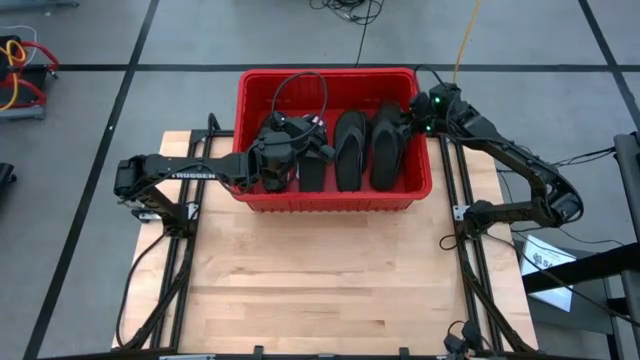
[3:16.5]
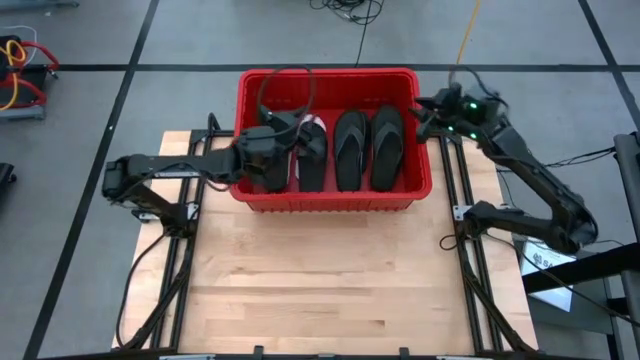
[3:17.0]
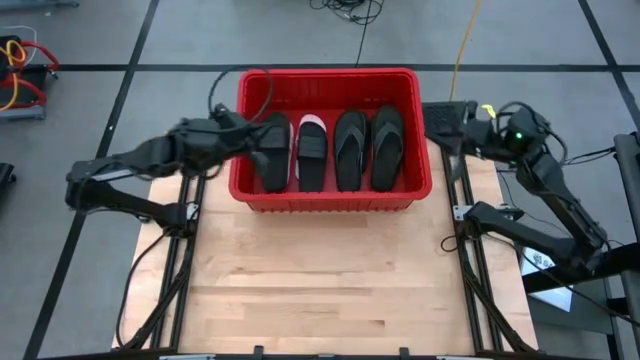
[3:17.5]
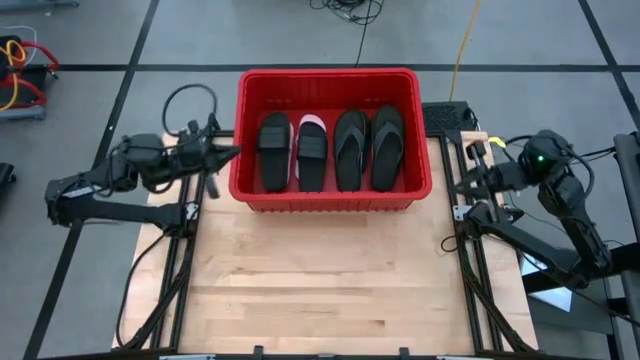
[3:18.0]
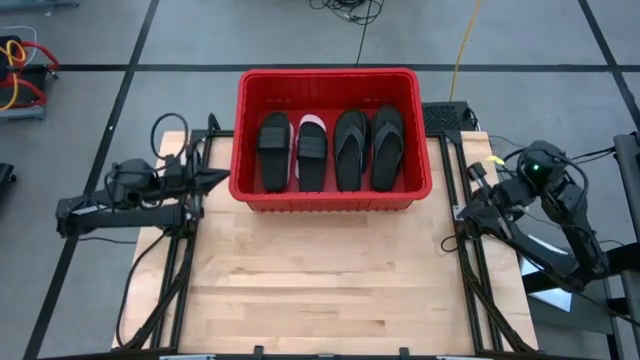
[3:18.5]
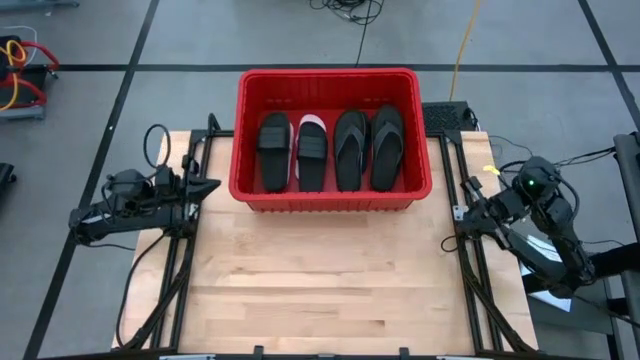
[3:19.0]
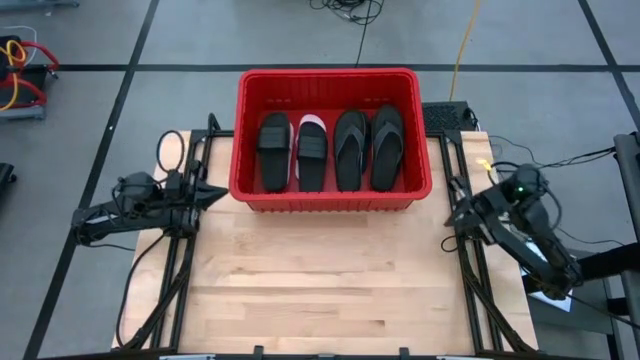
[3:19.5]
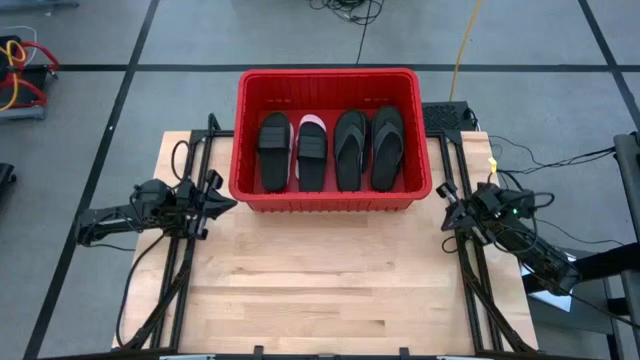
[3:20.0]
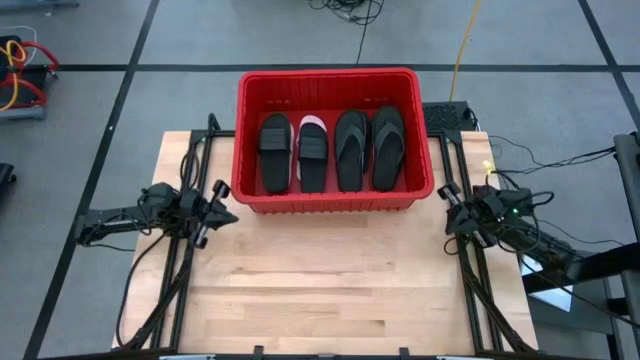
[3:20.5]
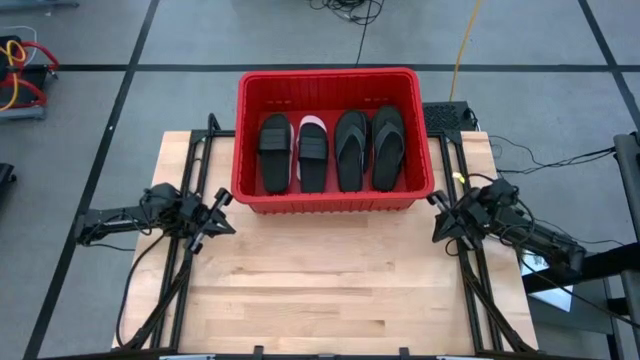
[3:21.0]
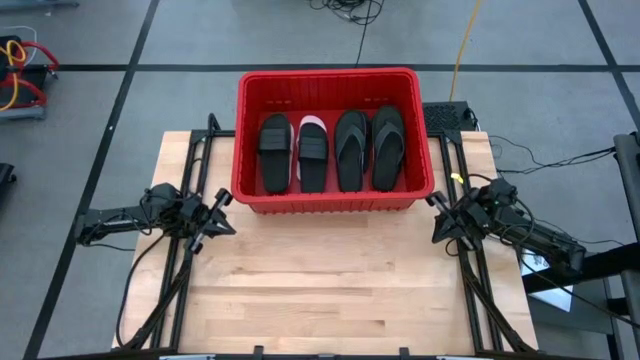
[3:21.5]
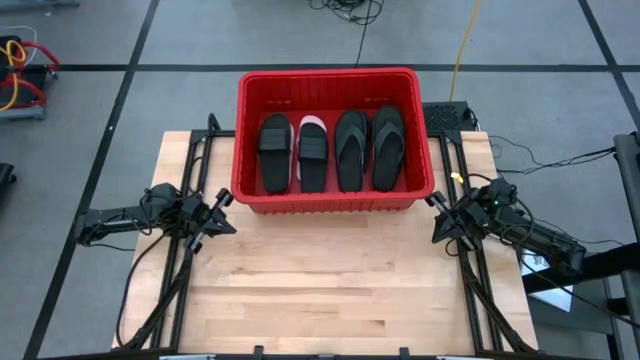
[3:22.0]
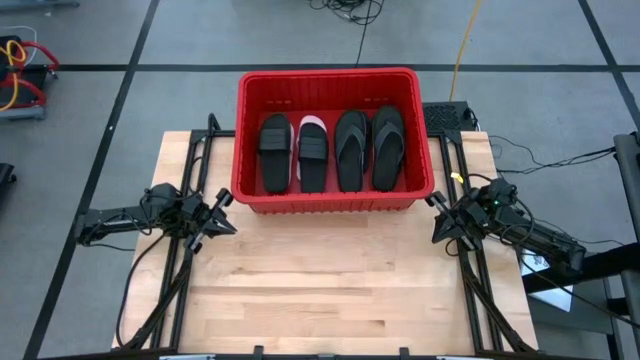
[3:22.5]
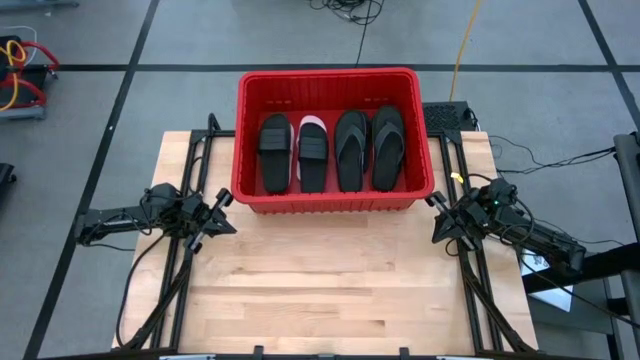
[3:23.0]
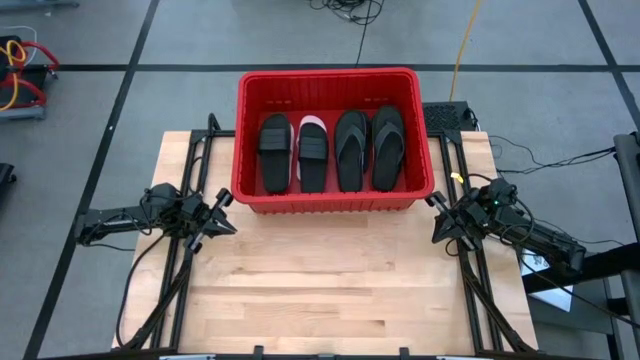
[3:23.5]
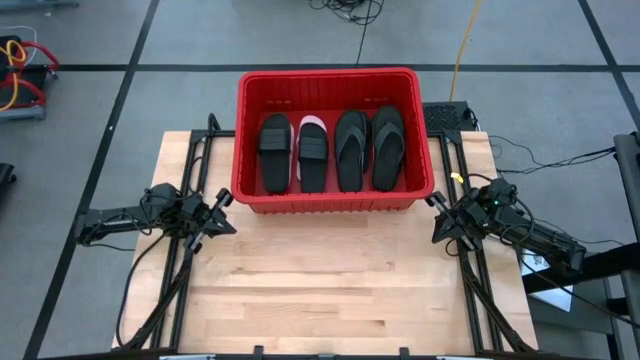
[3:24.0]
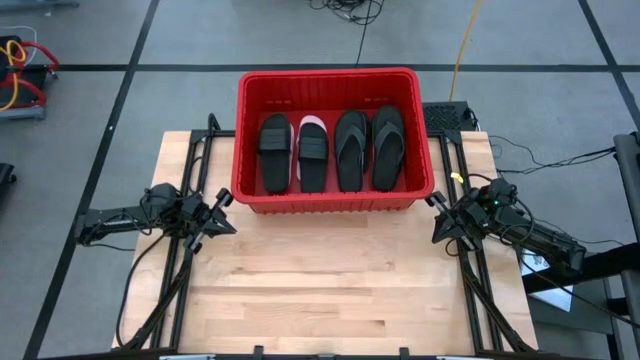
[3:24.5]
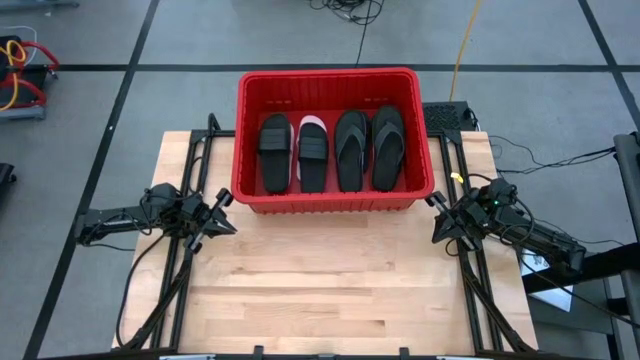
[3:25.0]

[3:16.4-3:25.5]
Task: Pick and place slides into bin
Return to Home Position

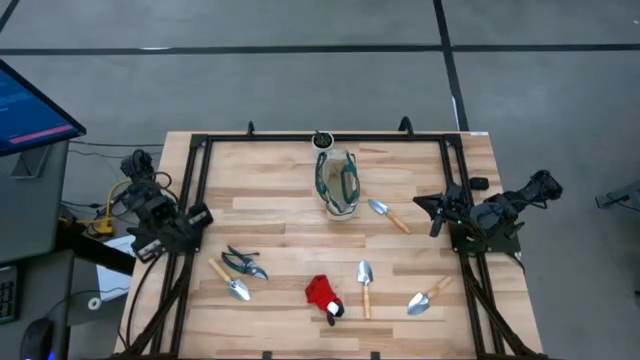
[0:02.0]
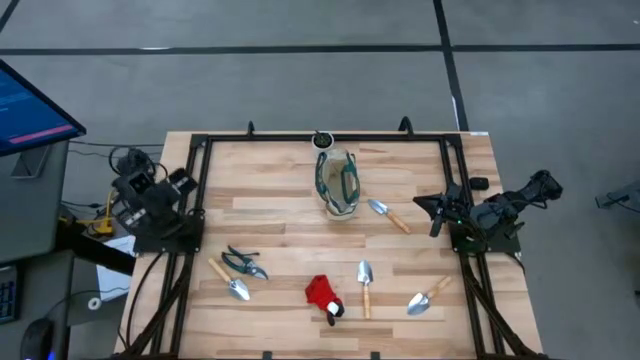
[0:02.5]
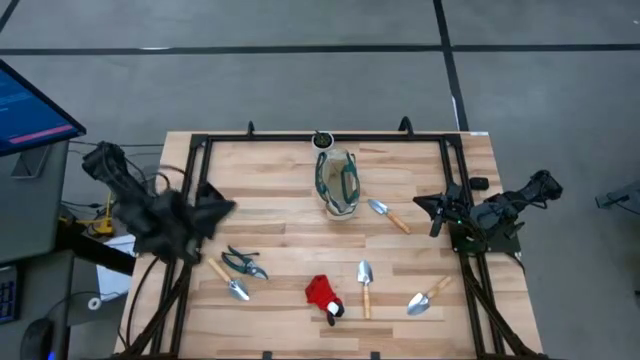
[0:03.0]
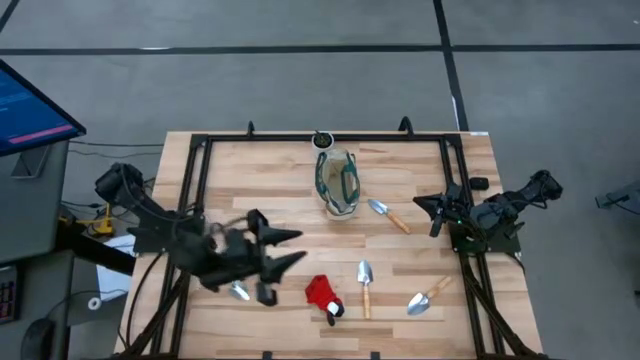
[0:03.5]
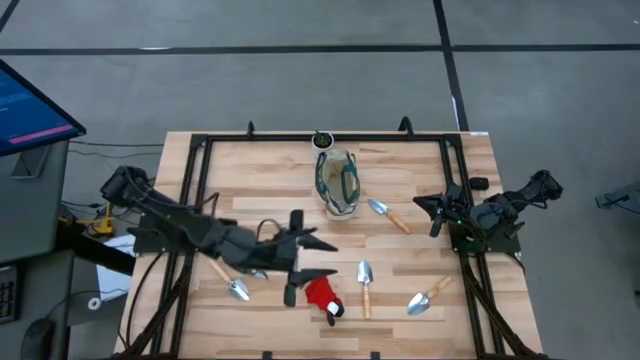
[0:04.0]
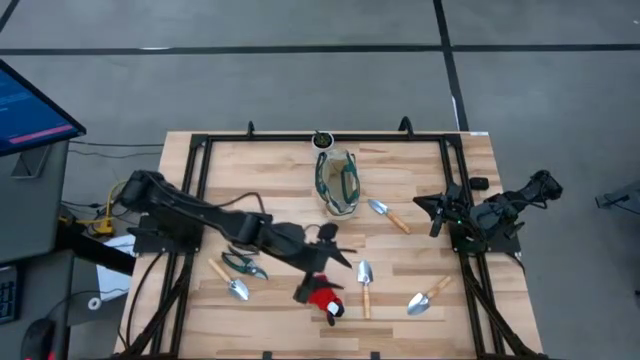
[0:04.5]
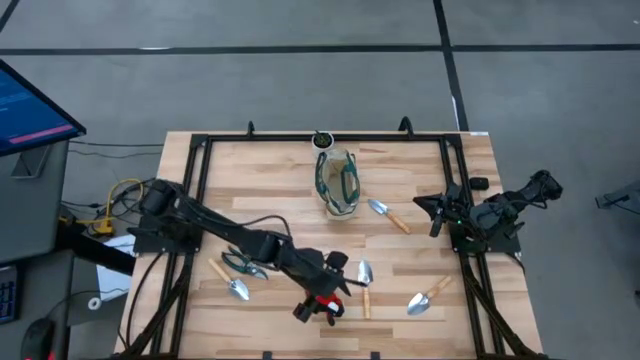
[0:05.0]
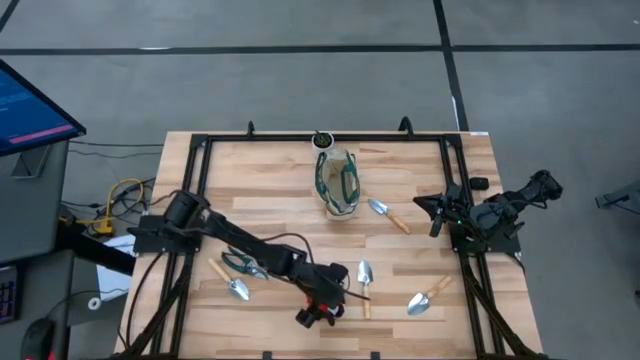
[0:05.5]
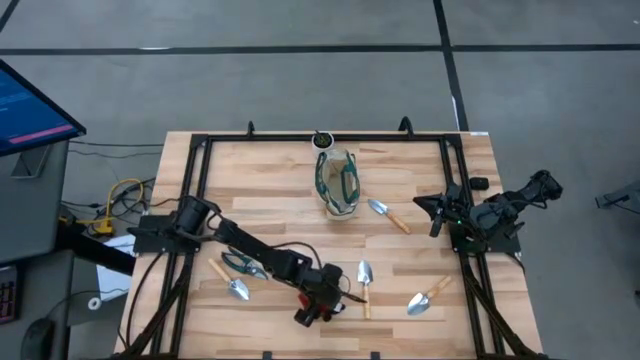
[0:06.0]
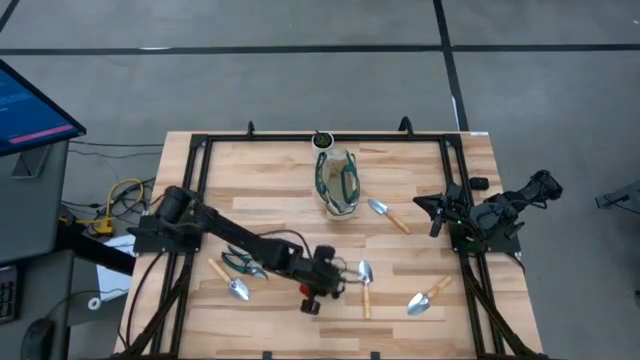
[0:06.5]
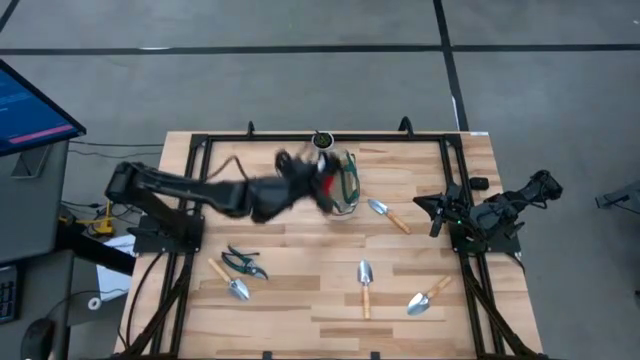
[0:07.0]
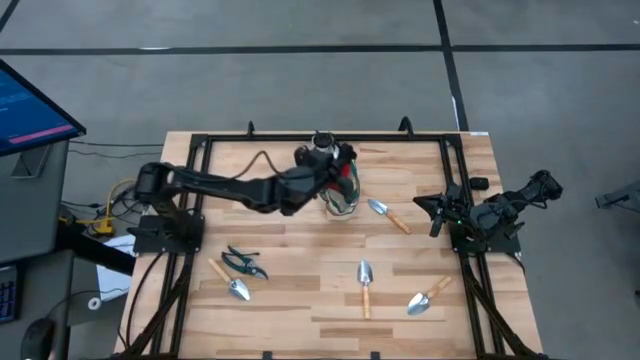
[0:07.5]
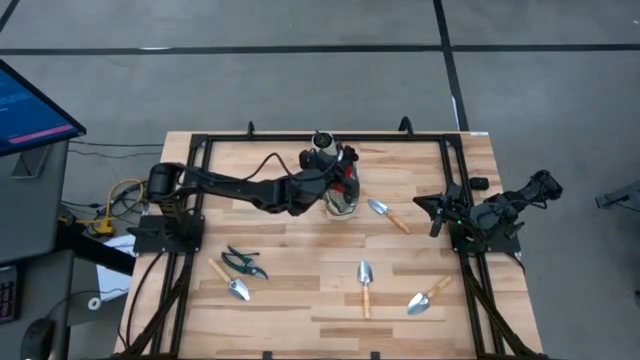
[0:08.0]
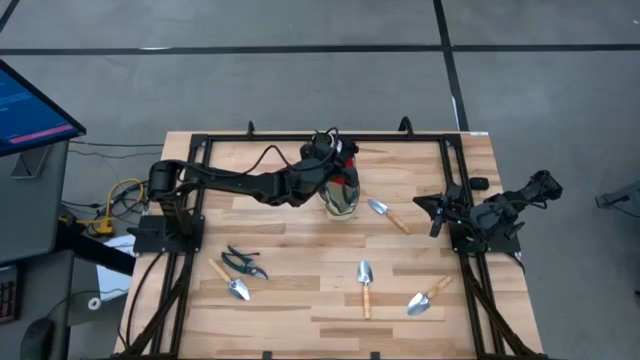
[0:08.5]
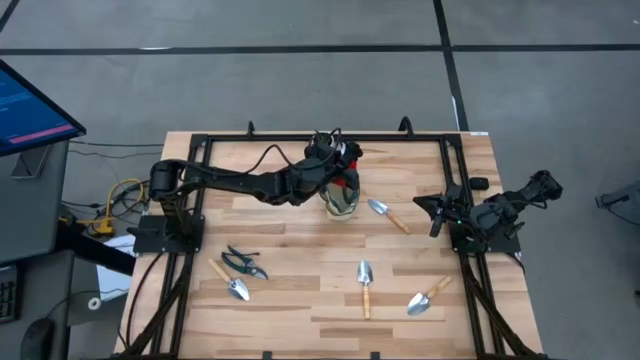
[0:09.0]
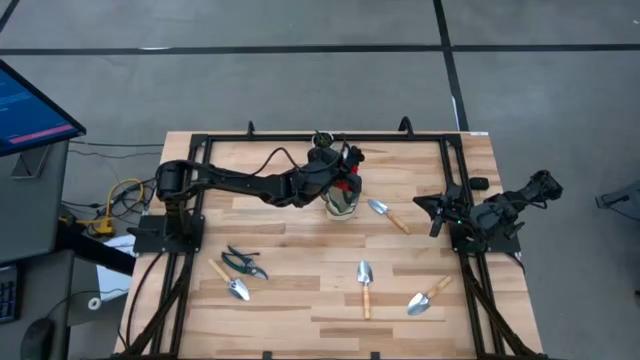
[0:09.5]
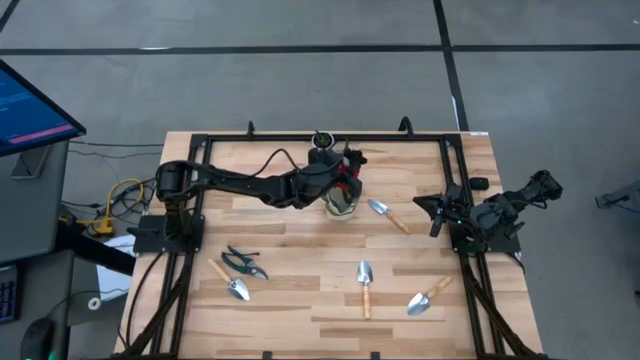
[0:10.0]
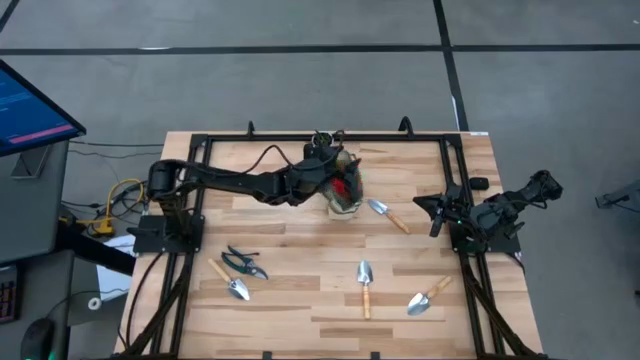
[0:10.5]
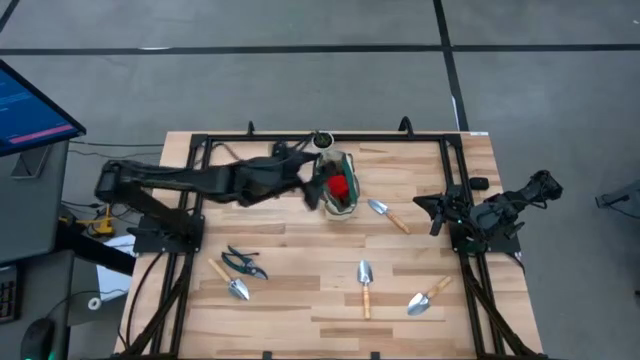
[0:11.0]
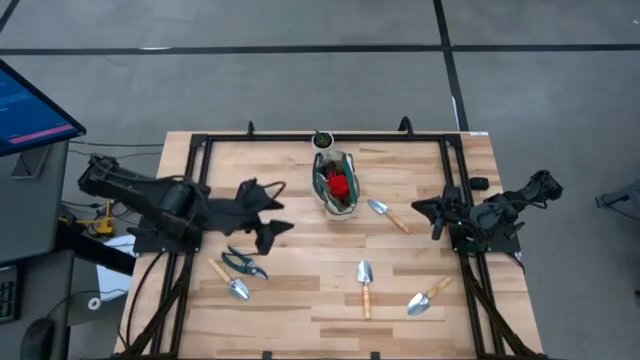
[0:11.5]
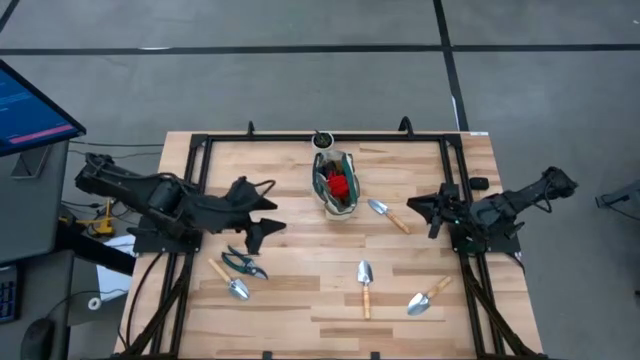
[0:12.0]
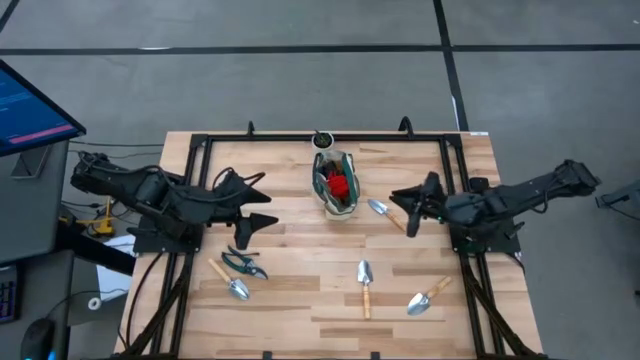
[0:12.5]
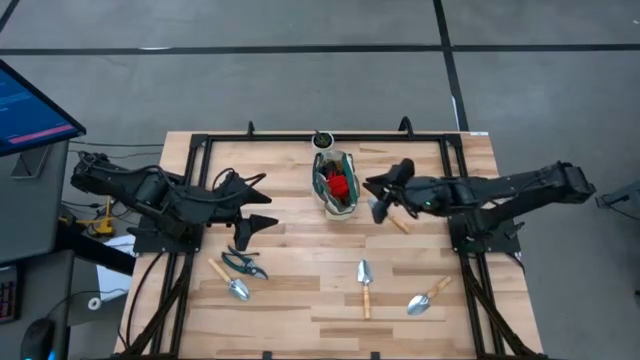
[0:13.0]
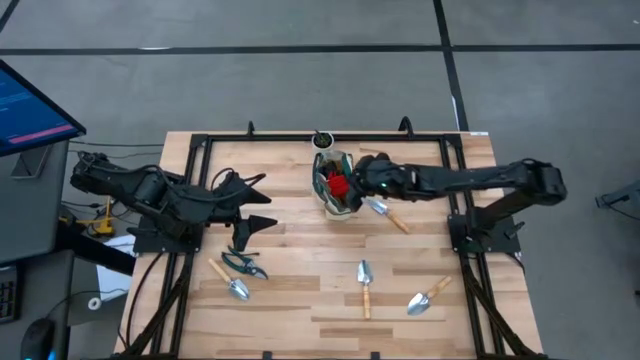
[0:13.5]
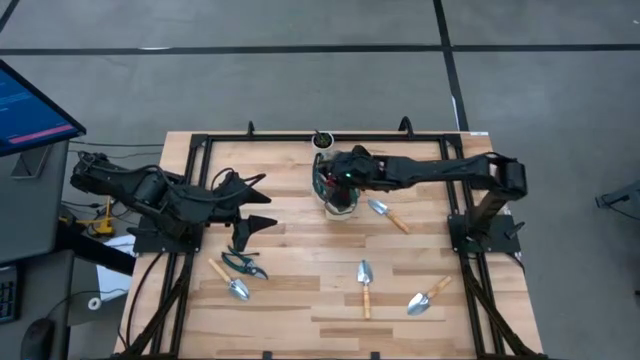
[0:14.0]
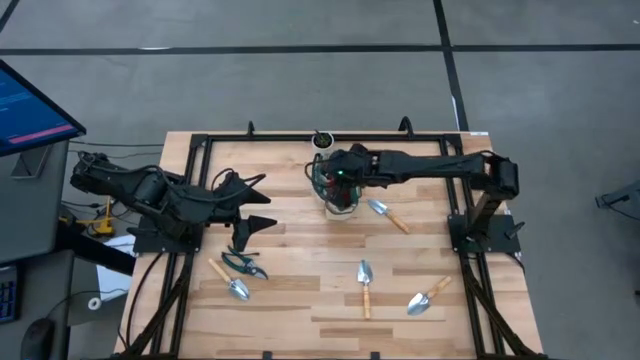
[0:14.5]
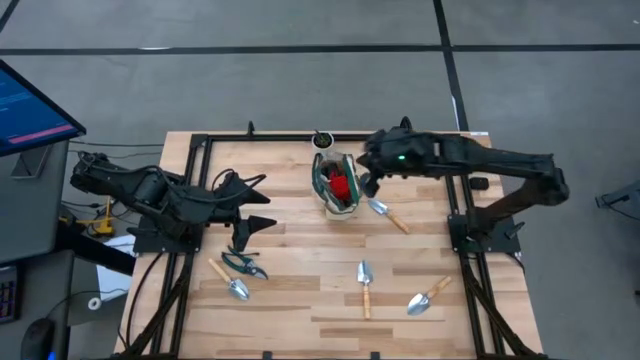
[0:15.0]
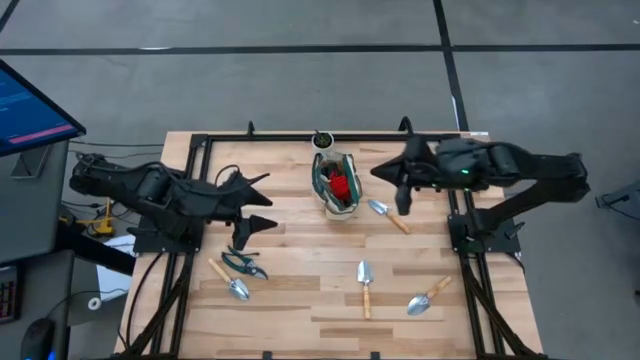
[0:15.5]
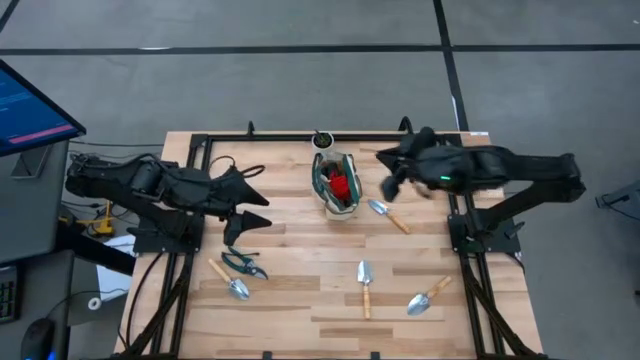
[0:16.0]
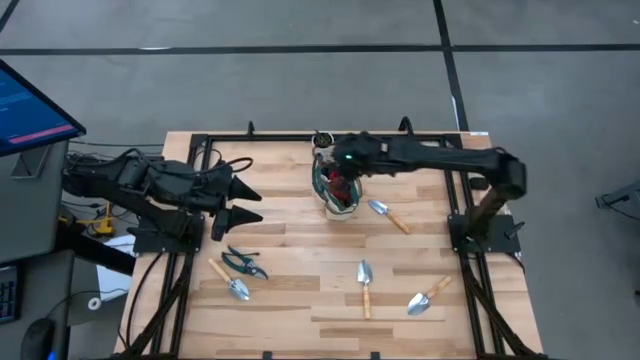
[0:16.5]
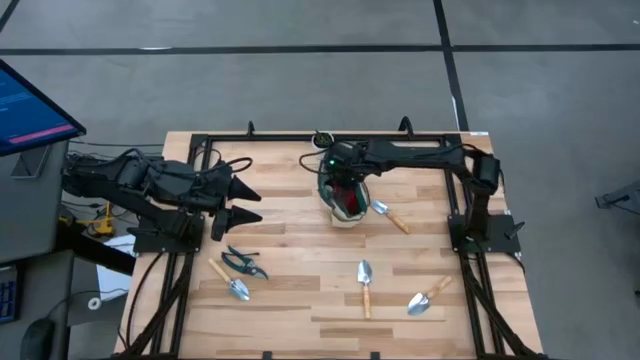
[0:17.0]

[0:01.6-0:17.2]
Task: Pick & Place Garden tools in Gardening bag
Put the red gloves into the green gardening bag
